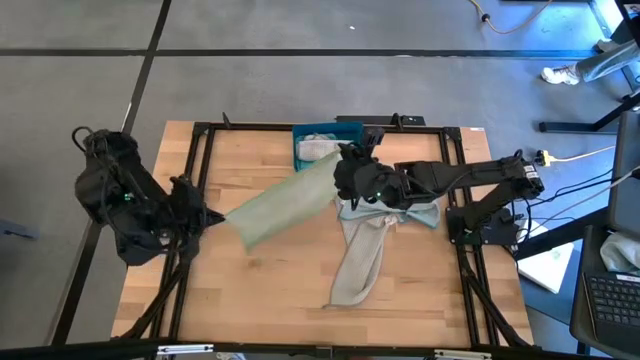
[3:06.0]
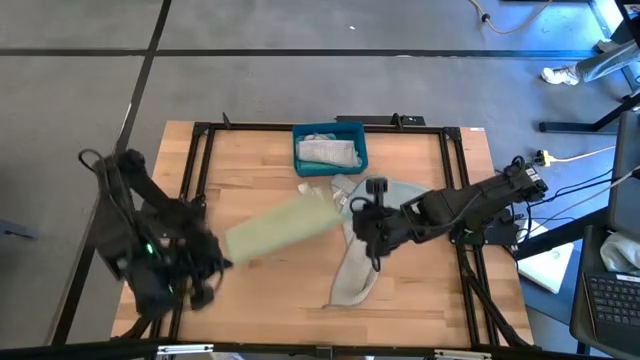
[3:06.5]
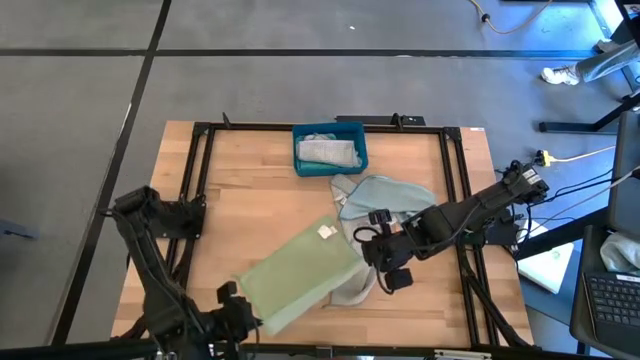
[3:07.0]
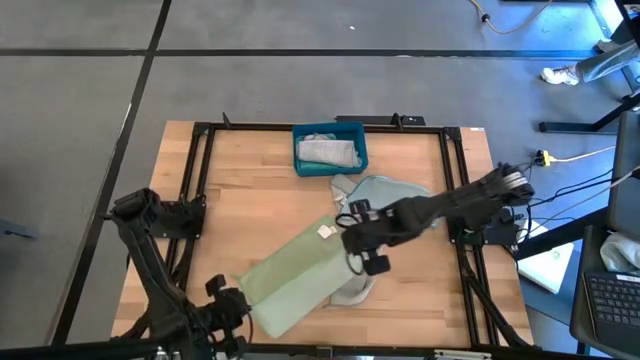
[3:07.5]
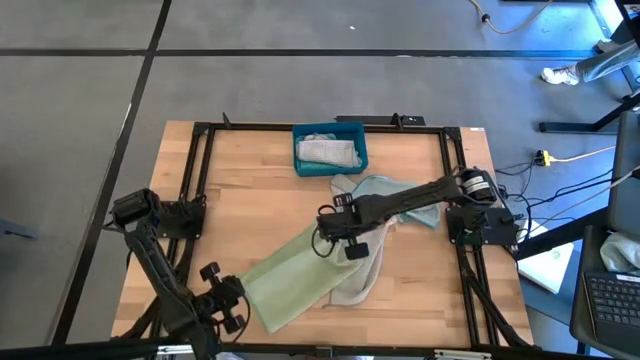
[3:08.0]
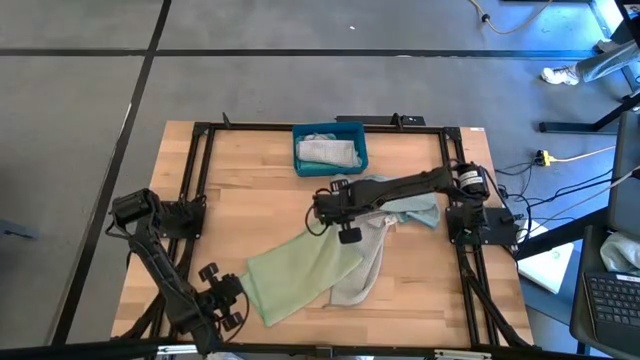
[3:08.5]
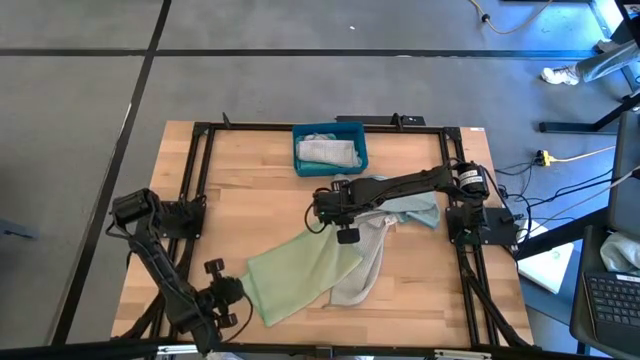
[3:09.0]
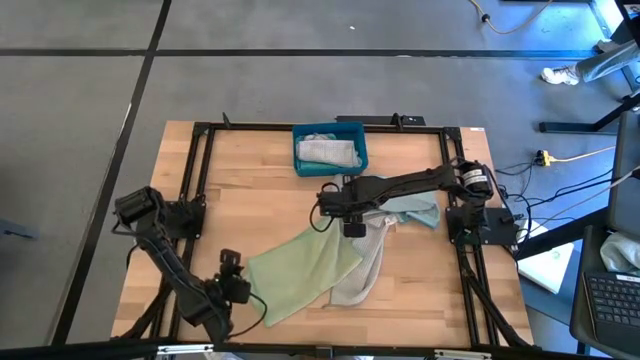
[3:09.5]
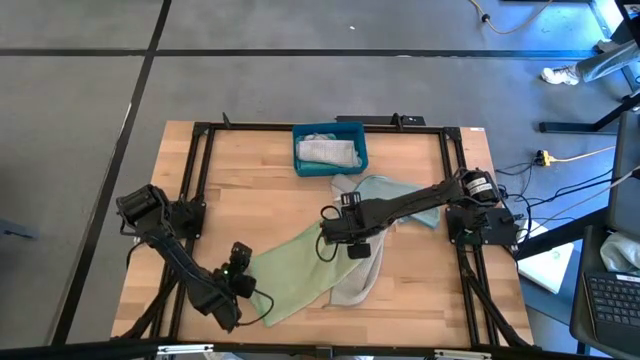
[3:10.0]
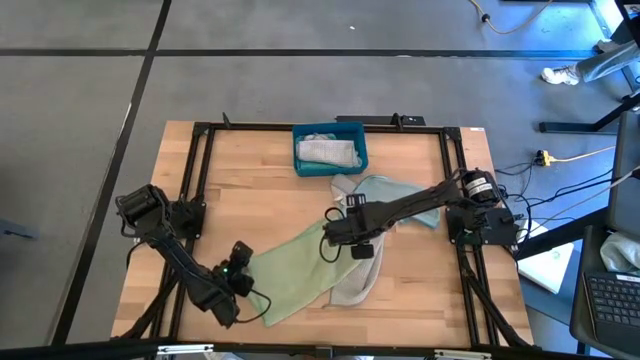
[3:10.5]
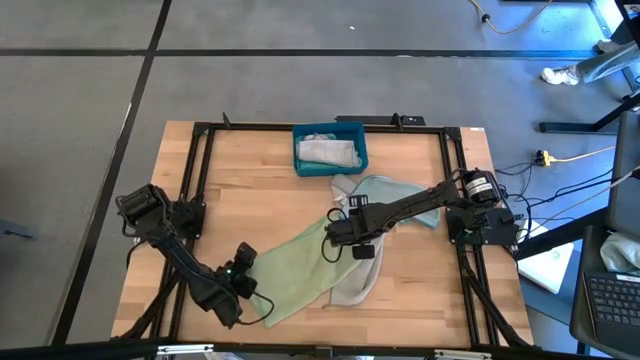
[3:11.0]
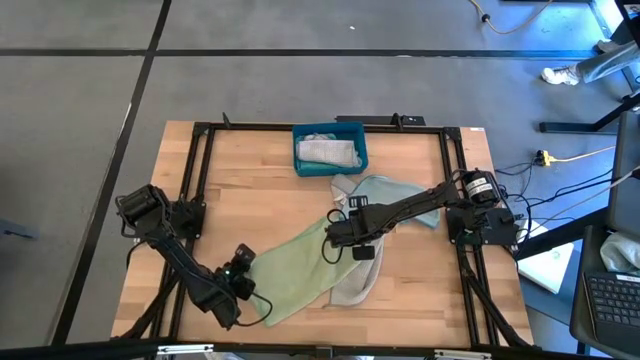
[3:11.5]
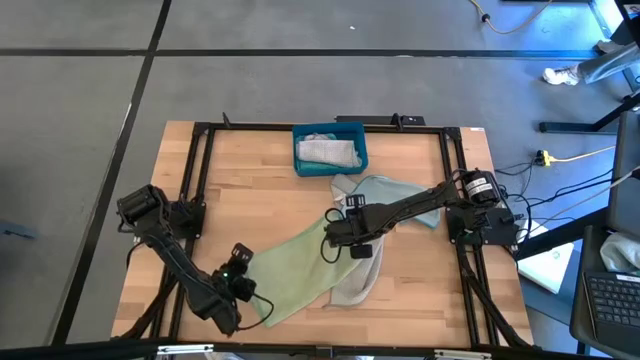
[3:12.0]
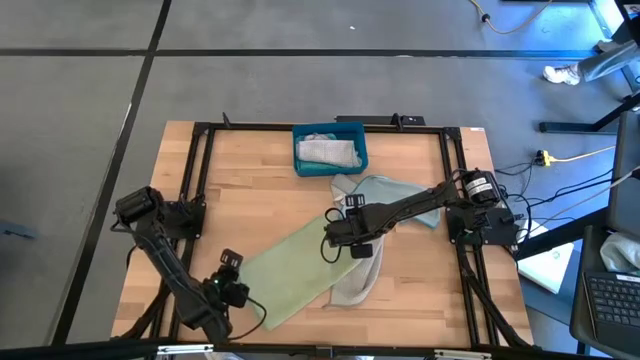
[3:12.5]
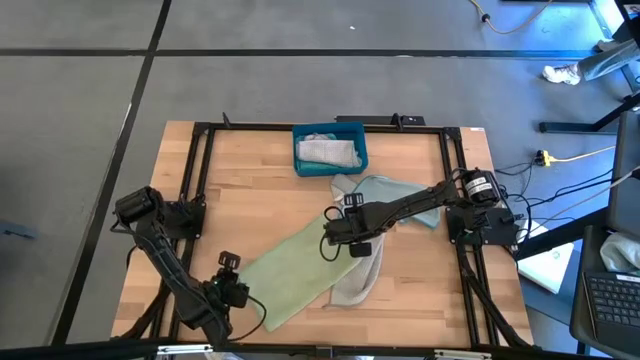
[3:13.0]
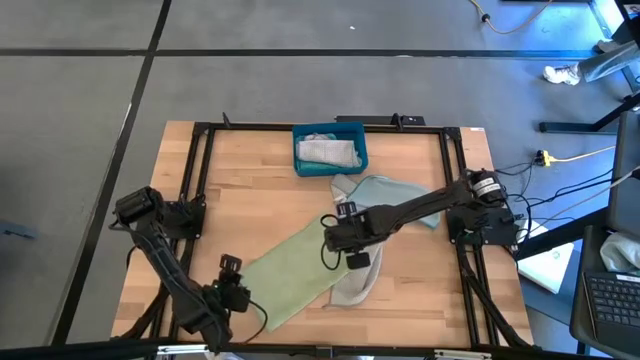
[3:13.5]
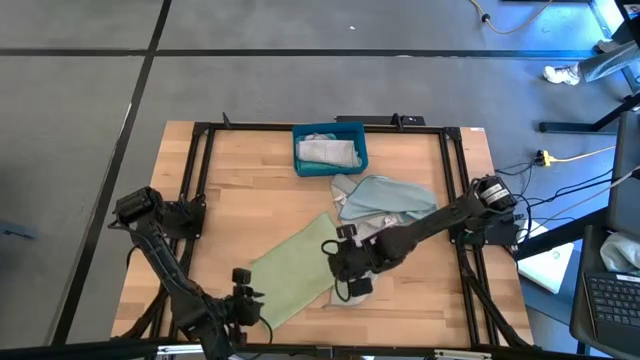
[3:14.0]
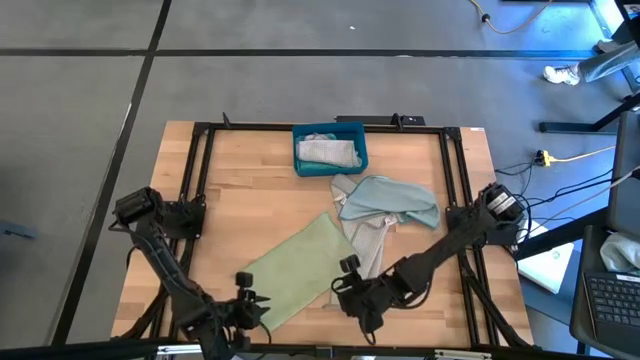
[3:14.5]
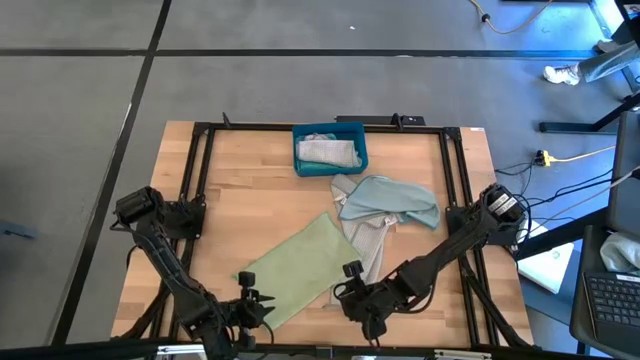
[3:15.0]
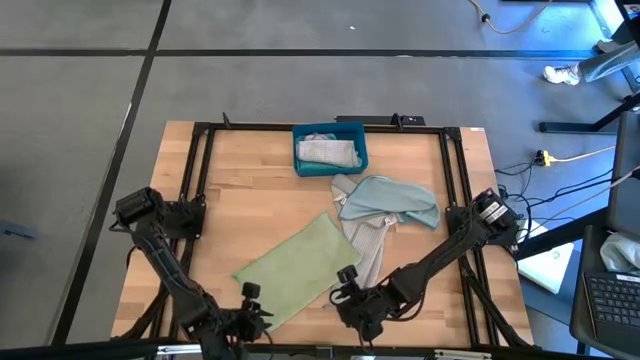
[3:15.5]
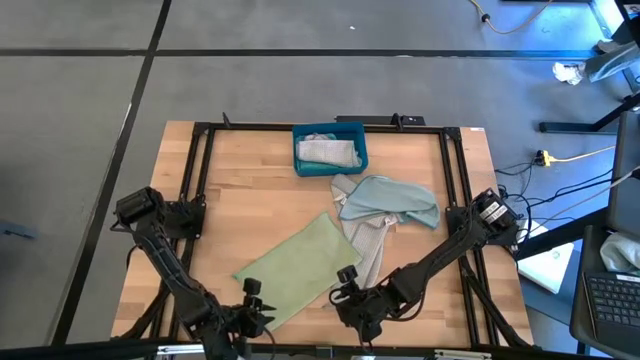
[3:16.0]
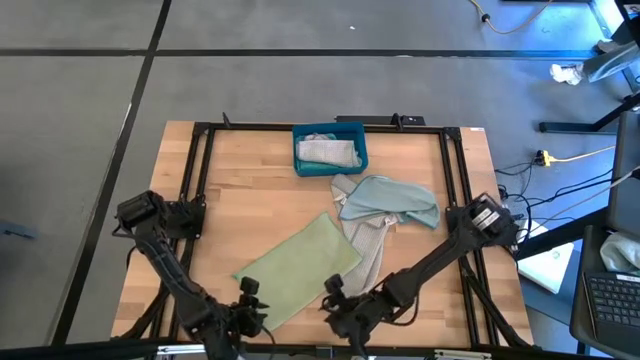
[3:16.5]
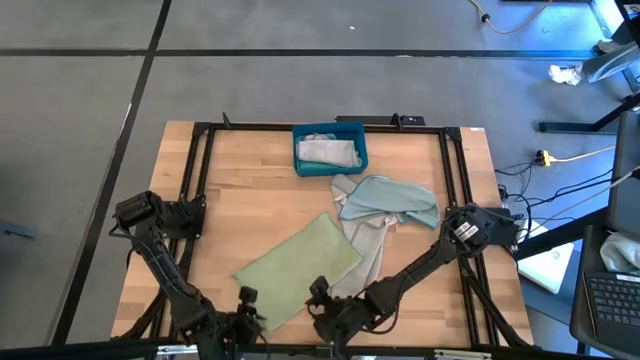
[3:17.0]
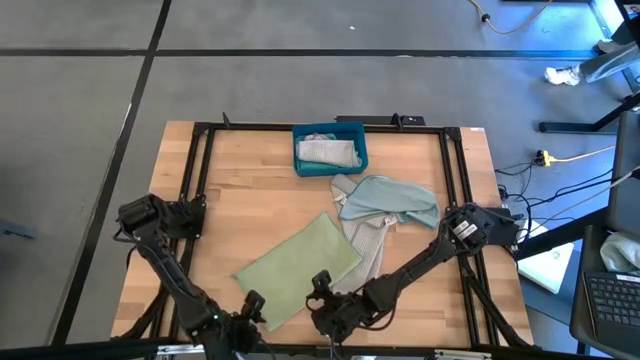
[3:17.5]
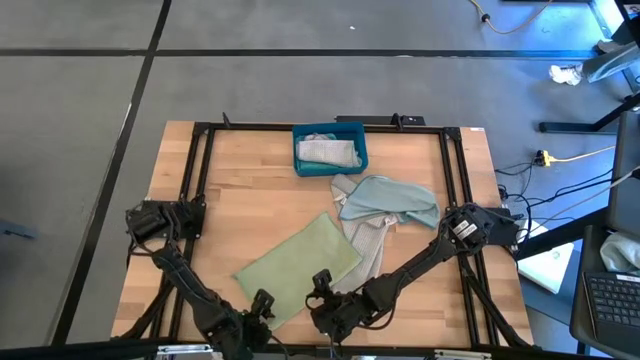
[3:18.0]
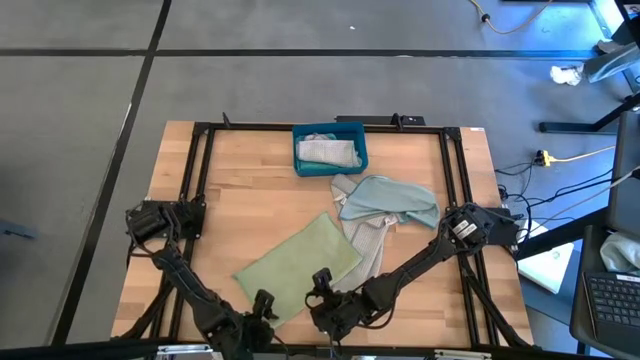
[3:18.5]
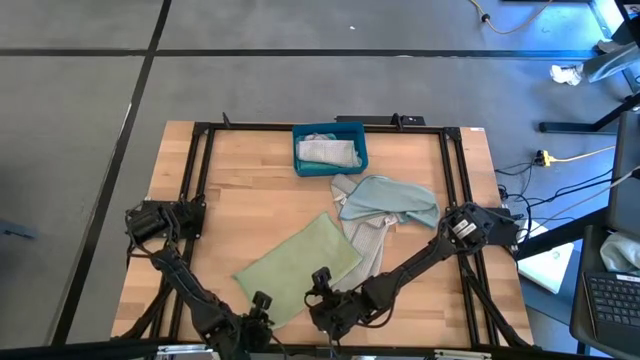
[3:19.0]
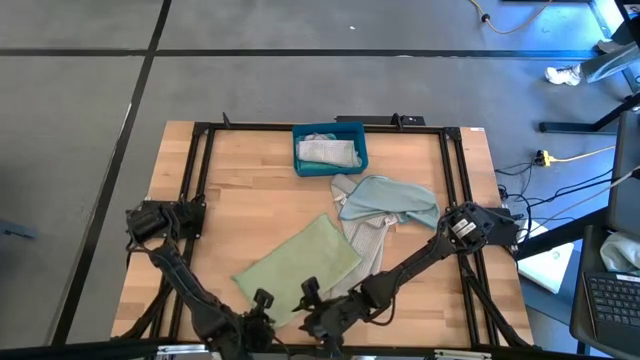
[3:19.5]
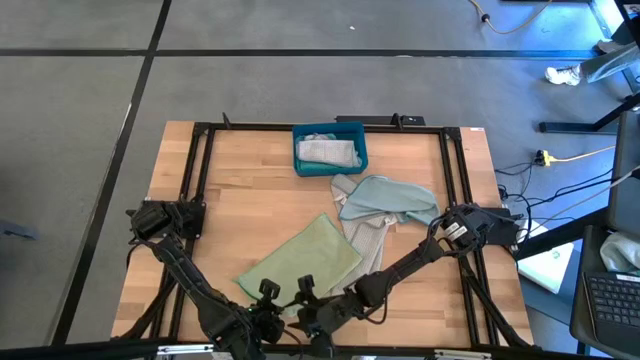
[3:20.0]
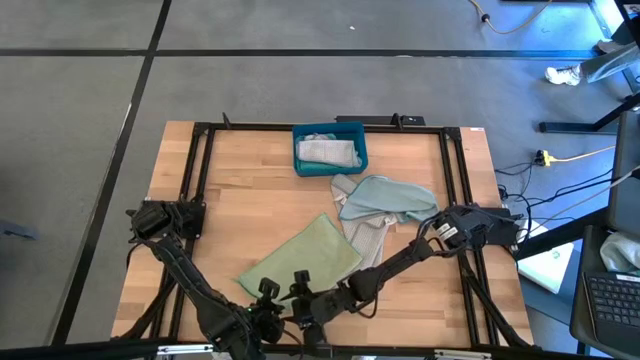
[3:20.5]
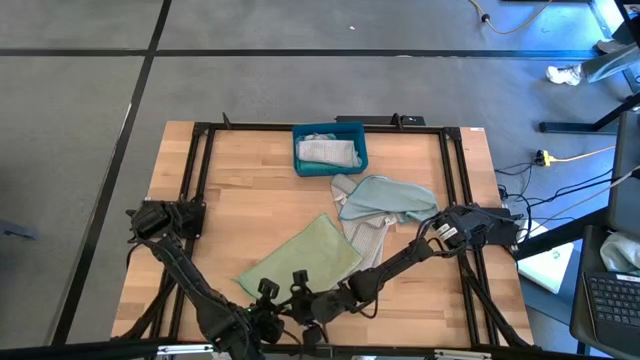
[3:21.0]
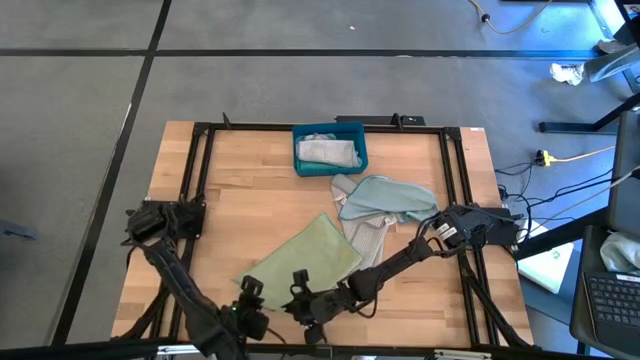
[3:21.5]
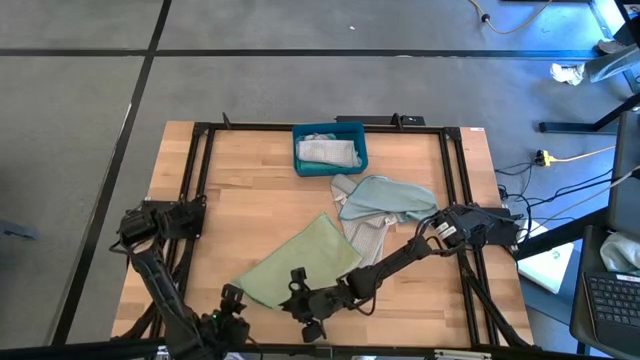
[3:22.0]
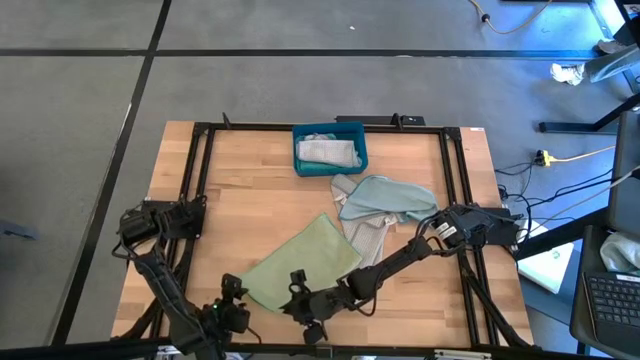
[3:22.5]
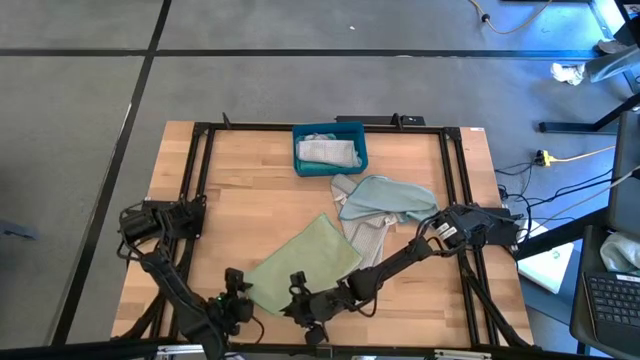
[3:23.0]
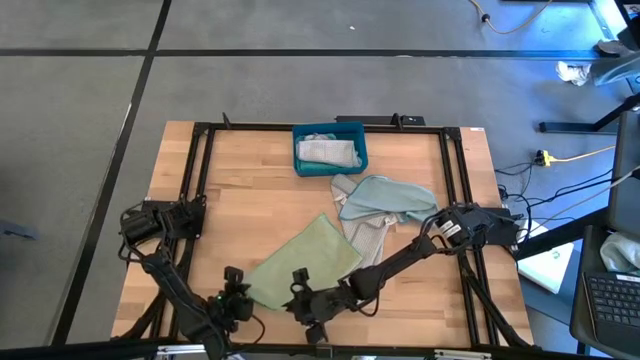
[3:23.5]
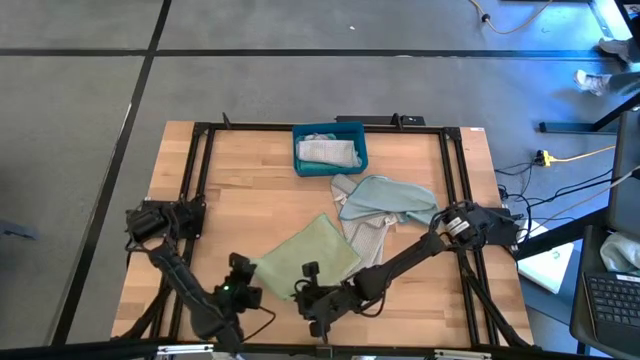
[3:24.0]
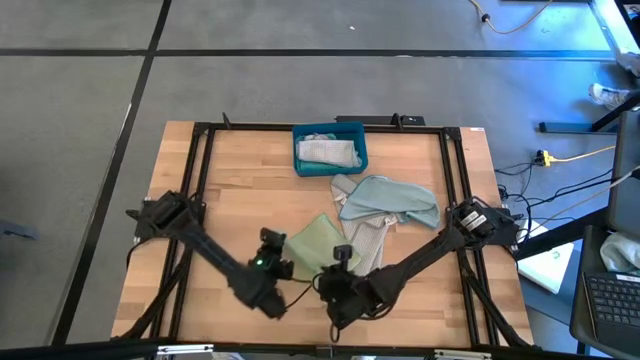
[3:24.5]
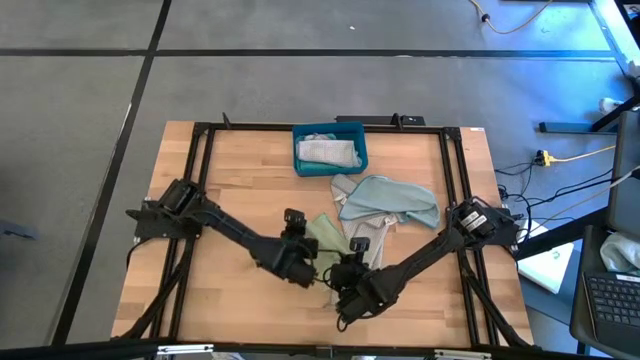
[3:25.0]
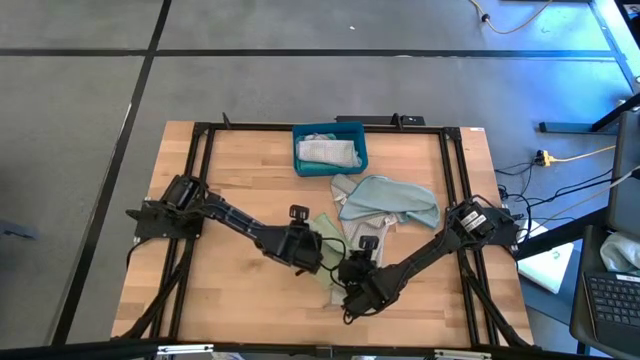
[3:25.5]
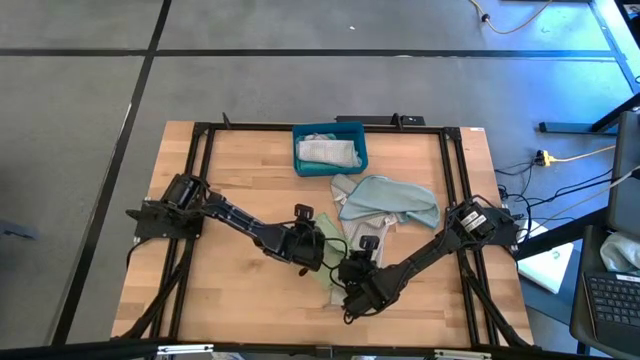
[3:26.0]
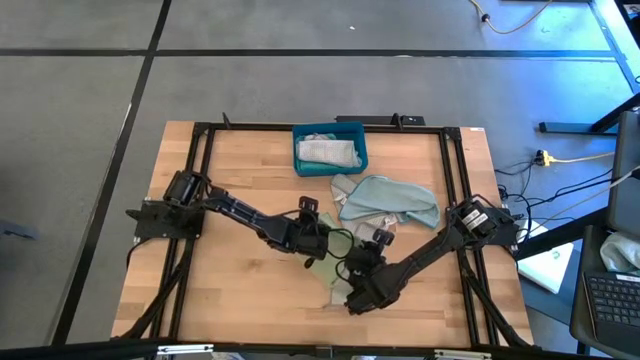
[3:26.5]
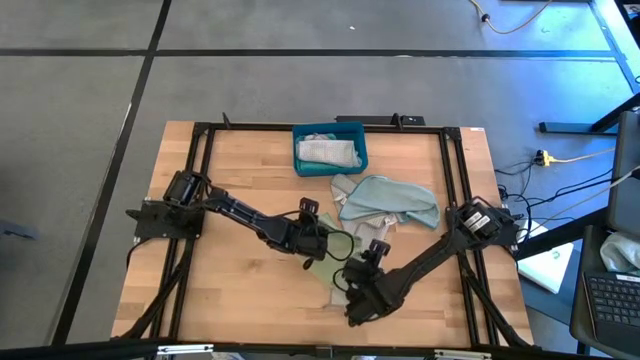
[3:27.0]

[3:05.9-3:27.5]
Task: Fold microfiber towels
Fold the green towel
